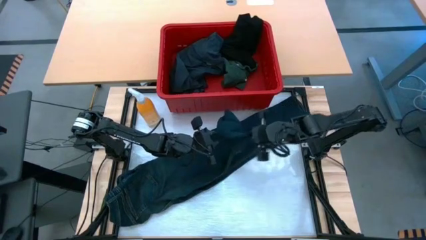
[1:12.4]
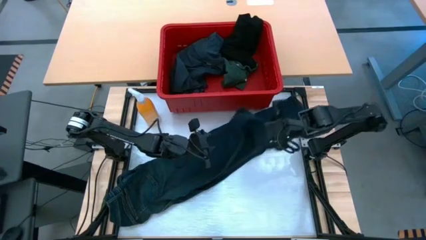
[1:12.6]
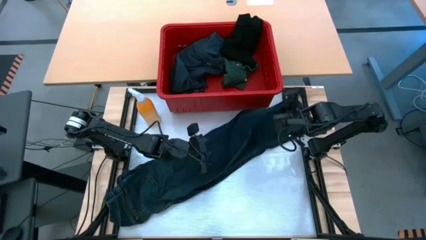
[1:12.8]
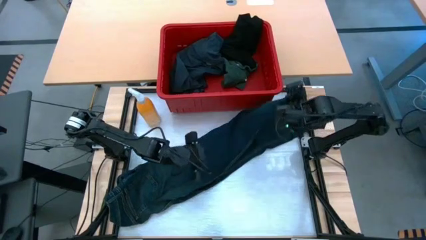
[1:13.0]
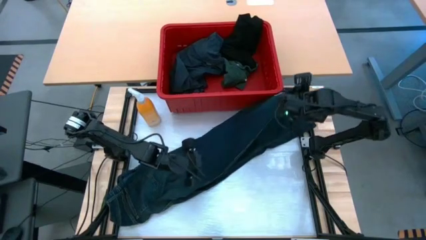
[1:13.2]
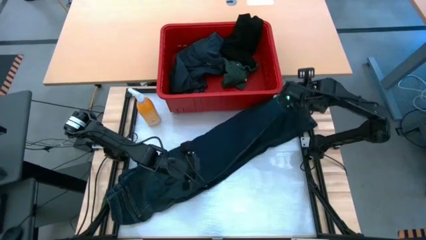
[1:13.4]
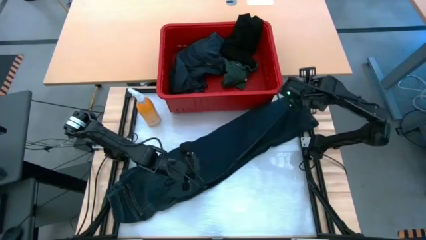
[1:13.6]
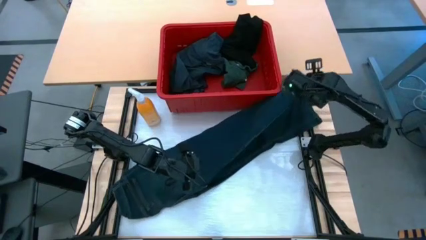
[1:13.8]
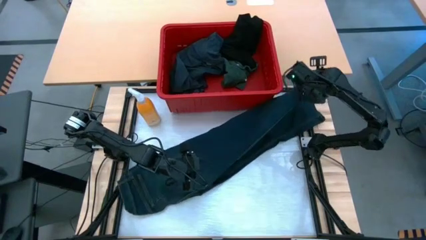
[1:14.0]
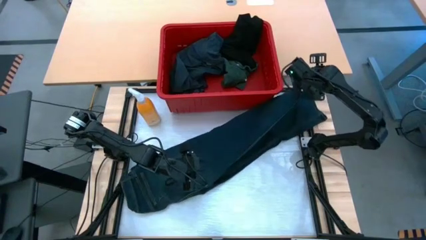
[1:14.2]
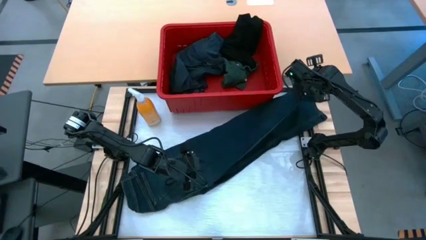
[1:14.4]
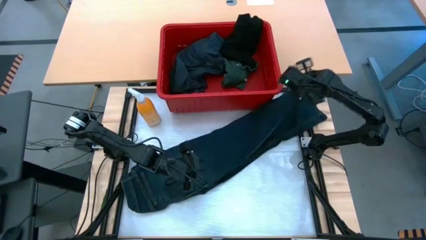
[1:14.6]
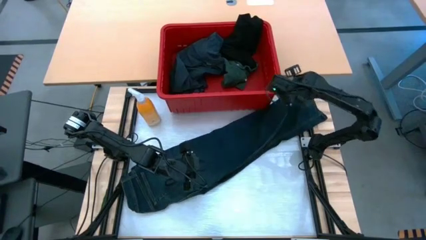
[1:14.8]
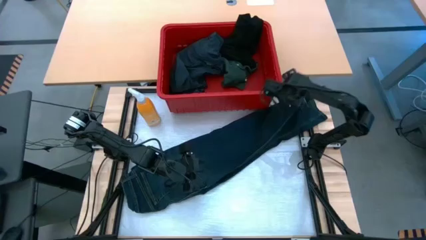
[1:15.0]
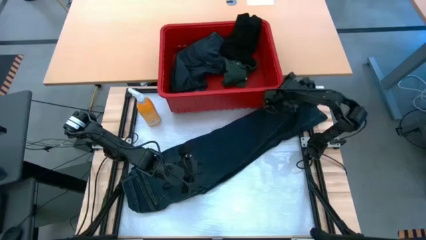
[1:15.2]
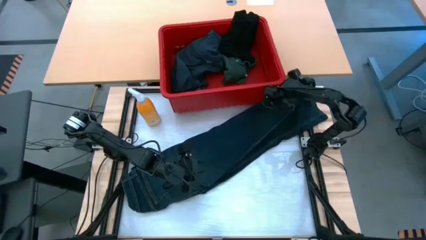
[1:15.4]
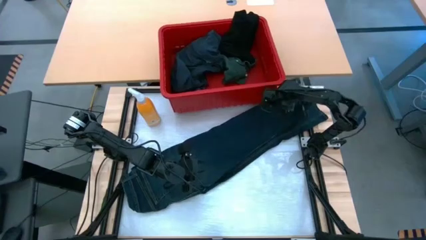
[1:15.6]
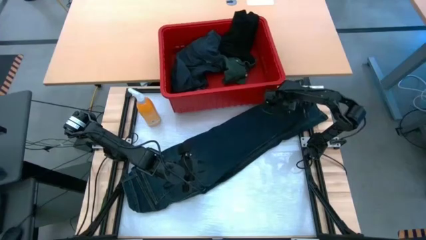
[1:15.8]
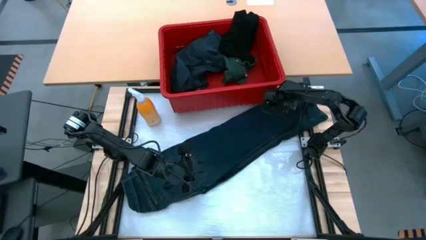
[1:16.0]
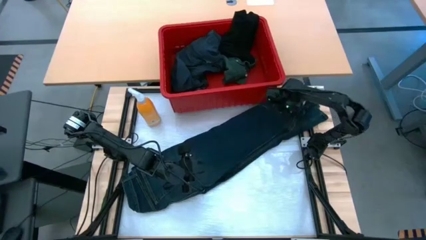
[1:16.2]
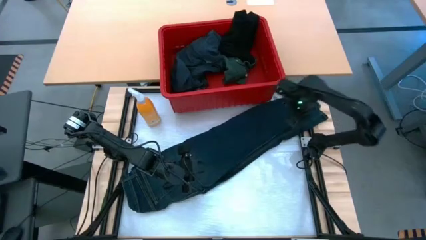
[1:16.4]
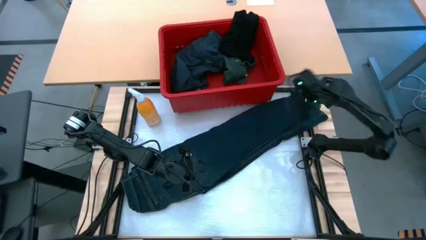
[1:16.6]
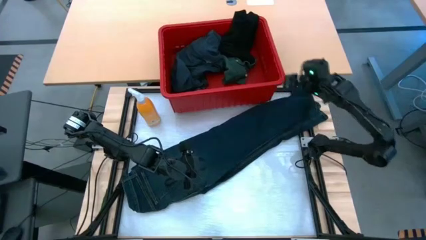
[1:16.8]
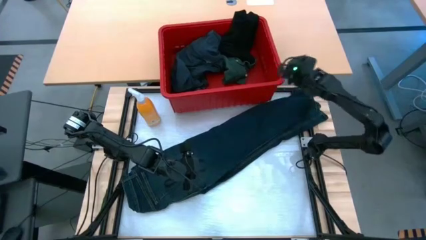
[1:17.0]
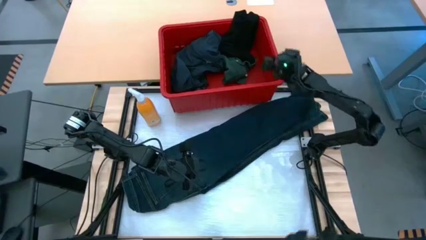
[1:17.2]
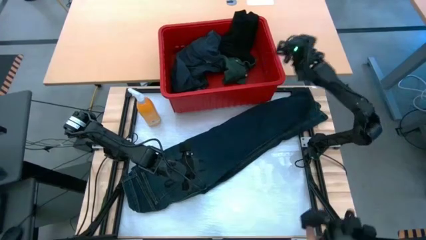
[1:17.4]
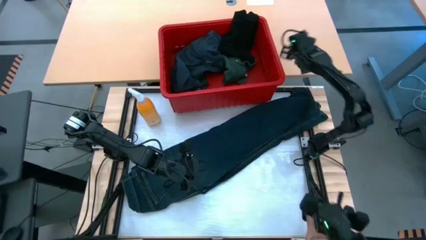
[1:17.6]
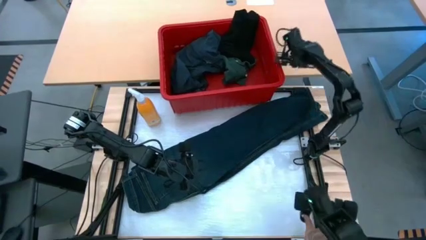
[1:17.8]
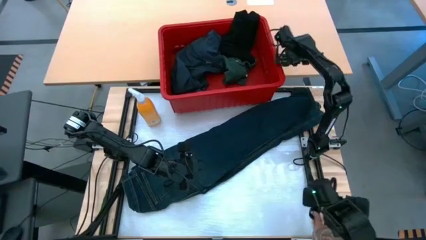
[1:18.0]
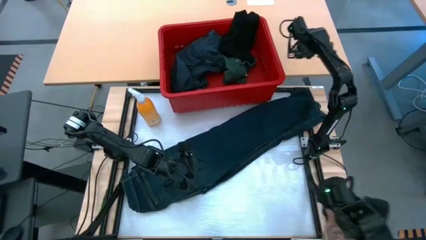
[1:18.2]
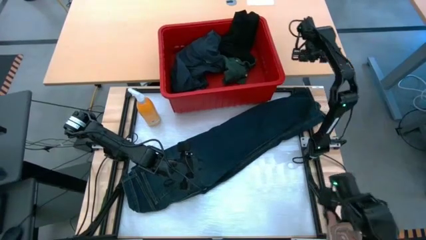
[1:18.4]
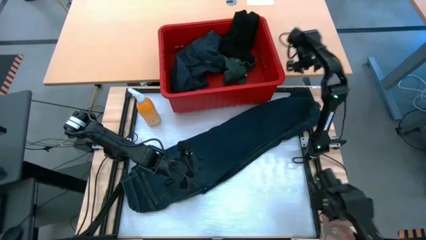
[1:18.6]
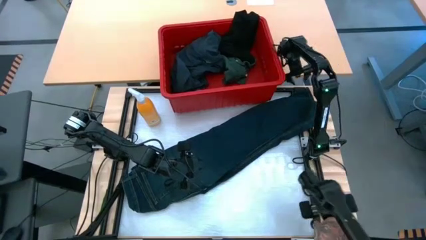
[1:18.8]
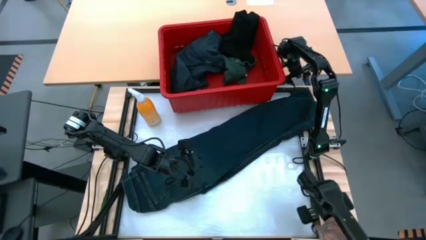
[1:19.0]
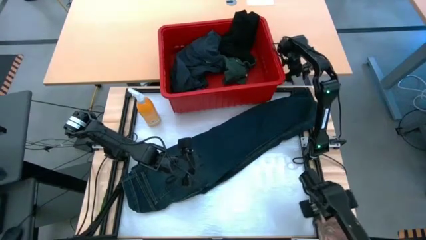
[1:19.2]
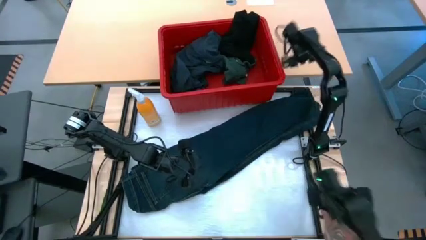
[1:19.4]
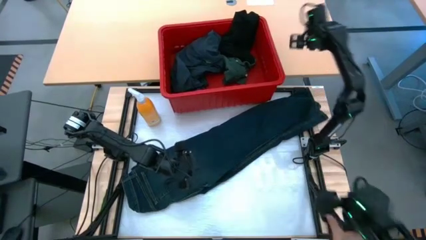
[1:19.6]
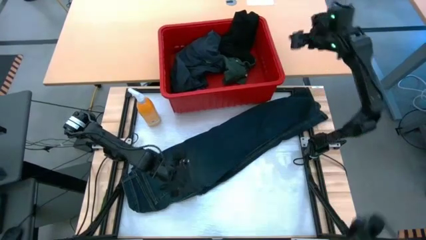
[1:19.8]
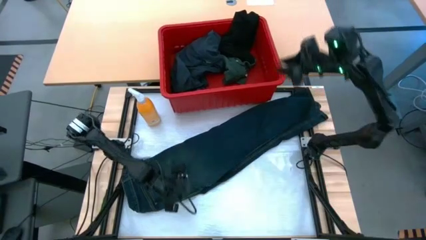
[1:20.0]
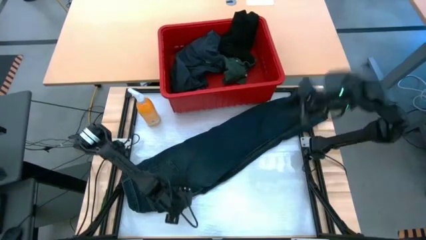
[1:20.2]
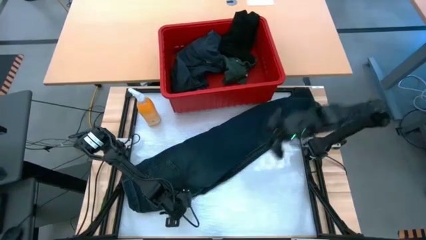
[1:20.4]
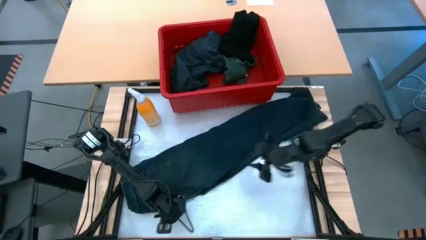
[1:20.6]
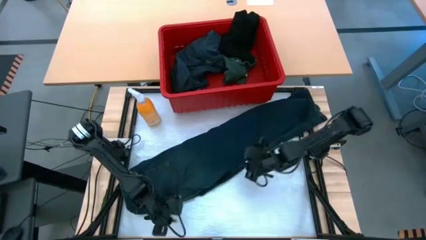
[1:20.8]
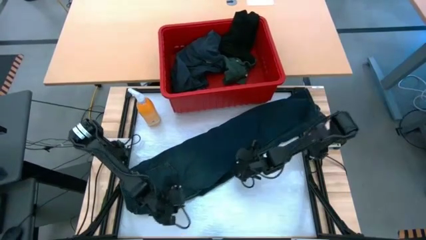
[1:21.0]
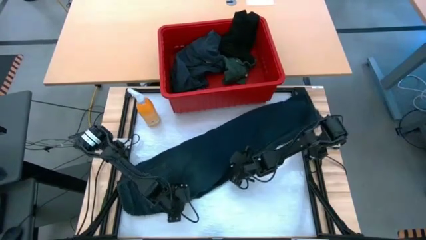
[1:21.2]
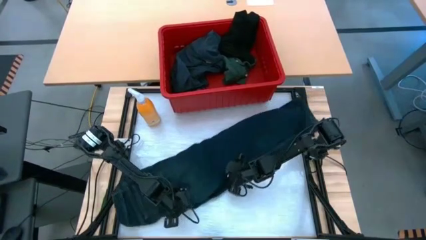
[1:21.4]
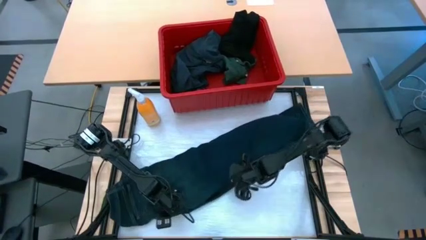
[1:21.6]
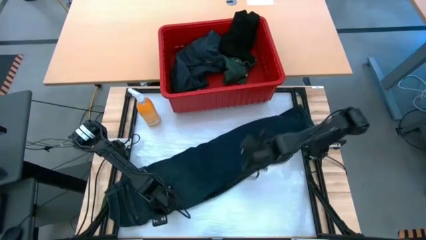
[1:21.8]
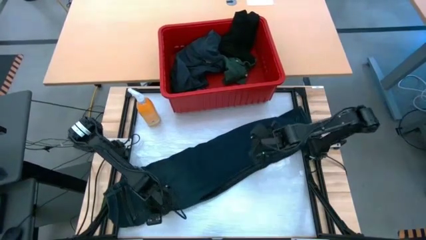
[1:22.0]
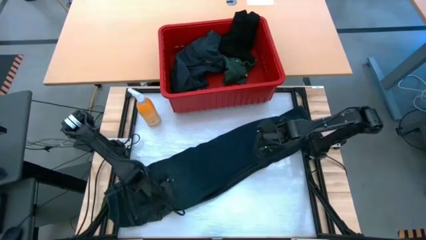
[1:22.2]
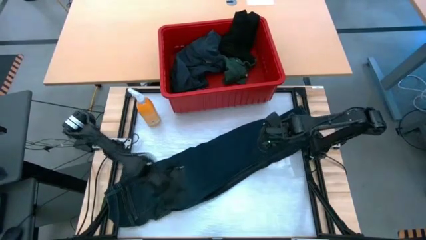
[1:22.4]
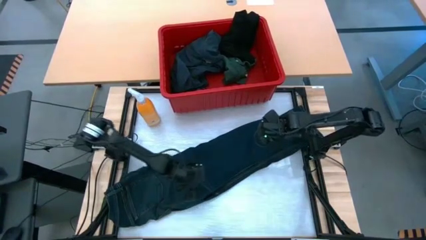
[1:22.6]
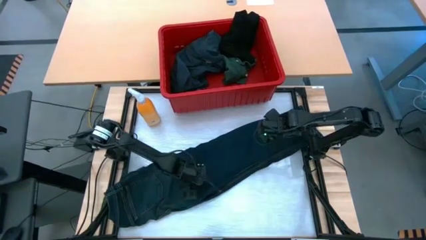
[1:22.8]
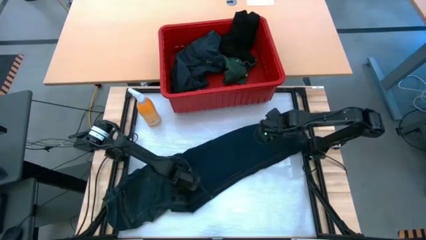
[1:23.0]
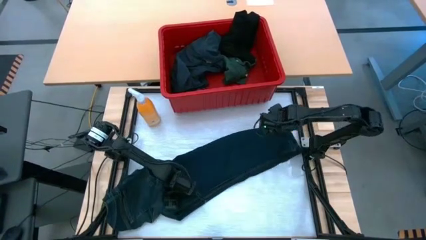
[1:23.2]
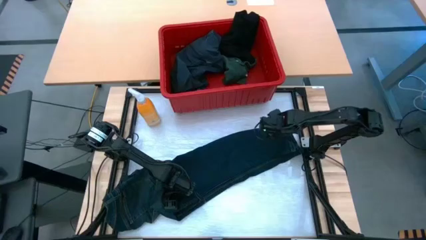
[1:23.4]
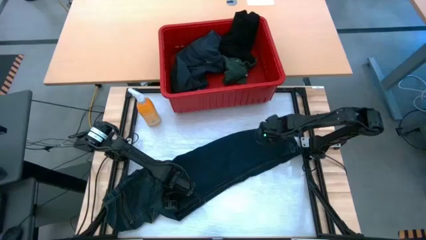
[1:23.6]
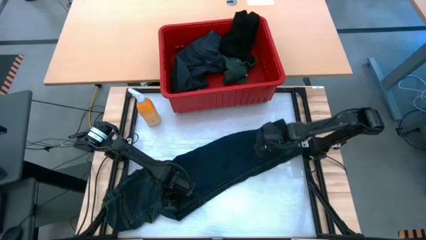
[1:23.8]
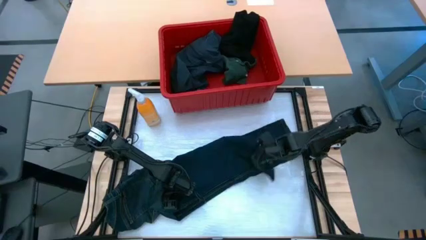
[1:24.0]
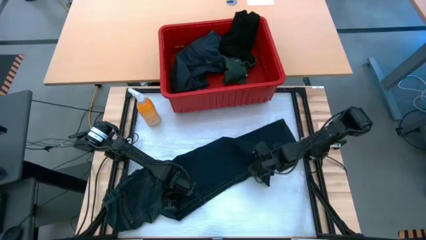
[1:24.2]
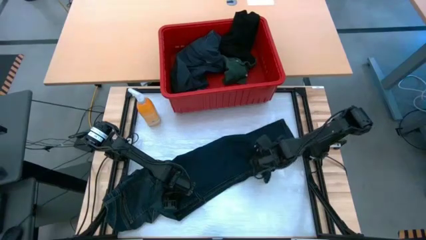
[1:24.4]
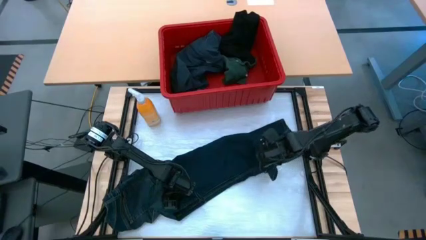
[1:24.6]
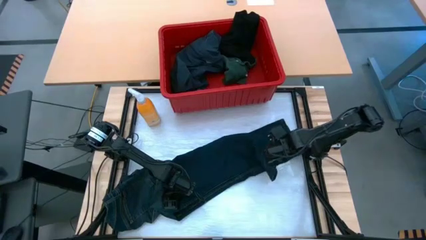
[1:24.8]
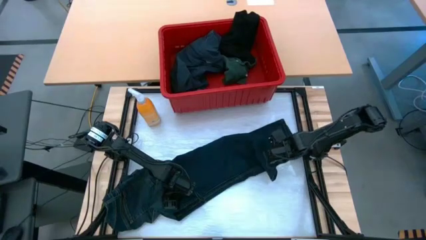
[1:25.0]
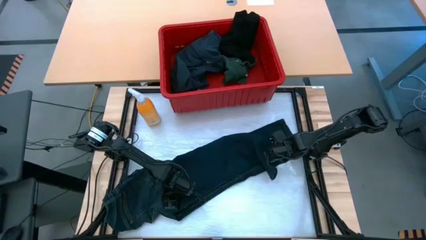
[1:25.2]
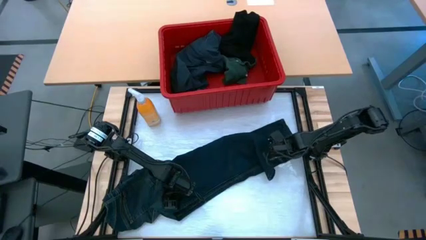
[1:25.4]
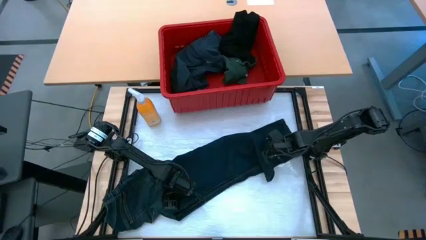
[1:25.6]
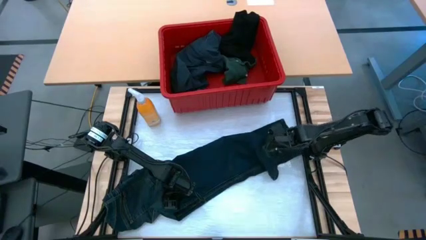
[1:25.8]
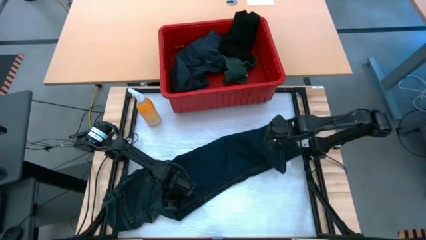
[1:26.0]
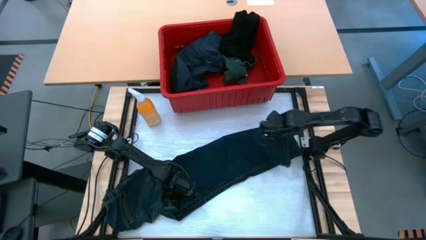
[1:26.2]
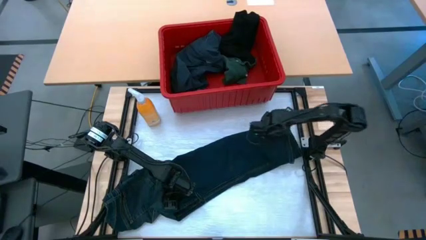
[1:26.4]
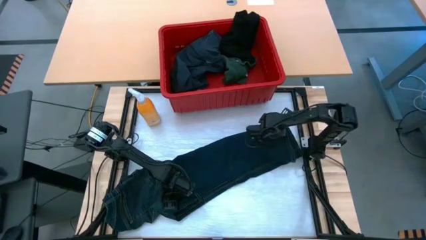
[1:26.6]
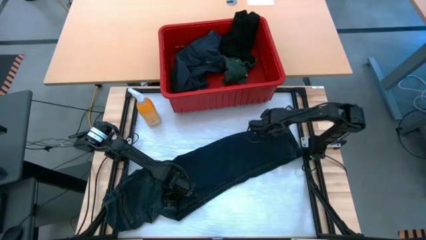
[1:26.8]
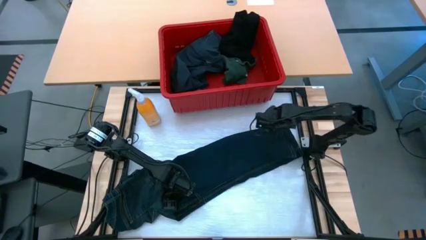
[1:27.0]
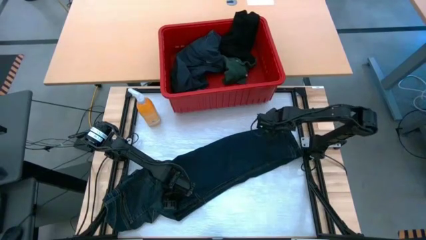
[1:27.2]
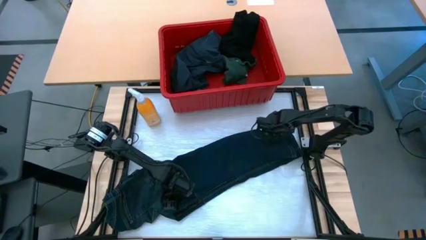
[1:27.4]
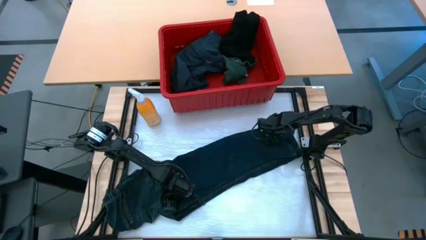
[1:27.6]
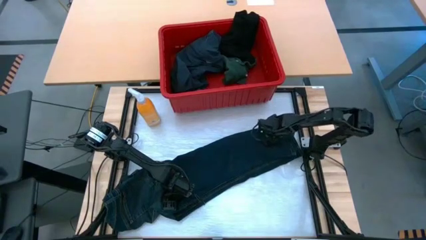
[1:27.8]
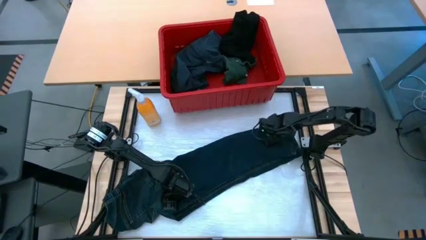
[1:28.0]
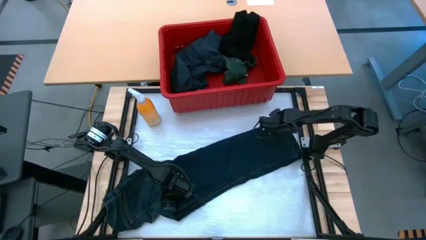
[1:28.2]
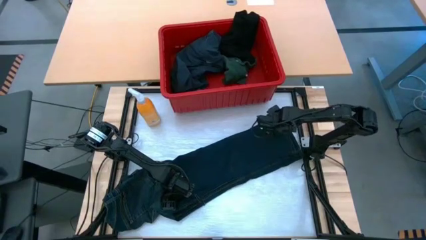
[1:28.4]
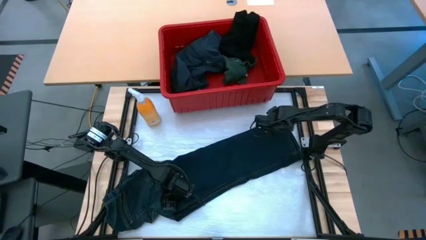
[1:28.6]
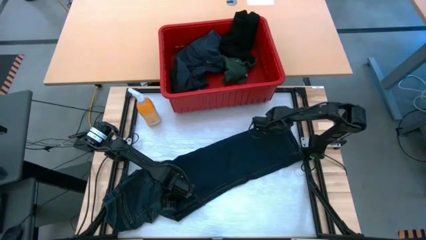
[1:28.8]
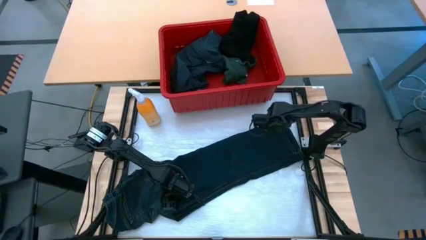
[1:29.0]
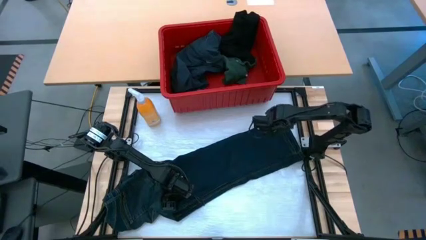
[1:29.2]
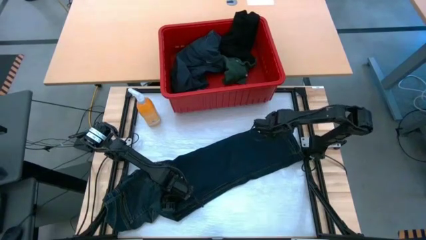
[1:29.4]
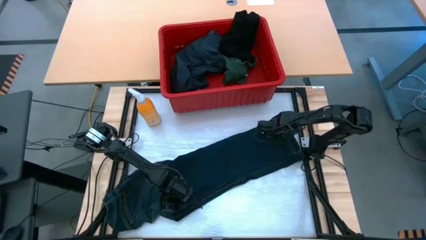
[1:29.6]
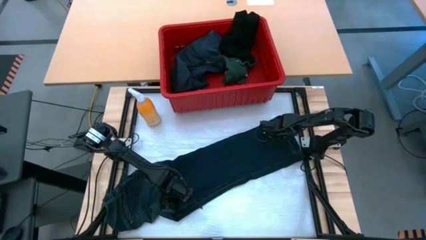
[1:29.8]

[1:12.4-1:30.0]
Task: Fold Laundry from Bin
Fold the dark blue jeans
